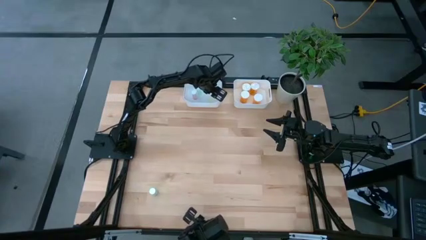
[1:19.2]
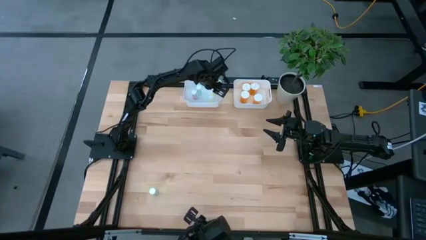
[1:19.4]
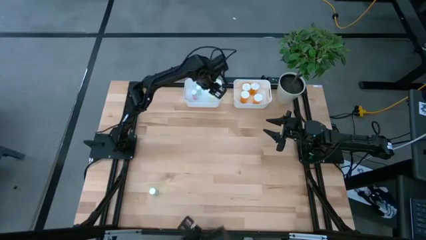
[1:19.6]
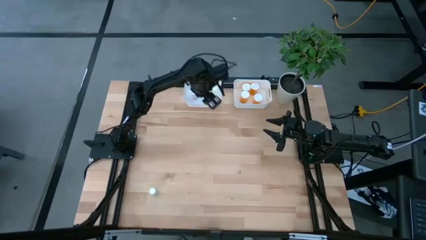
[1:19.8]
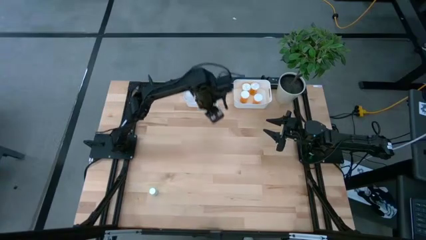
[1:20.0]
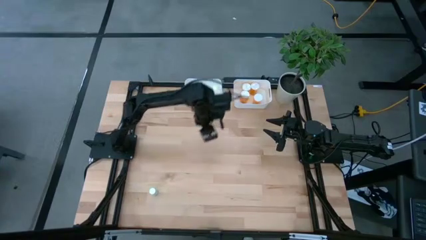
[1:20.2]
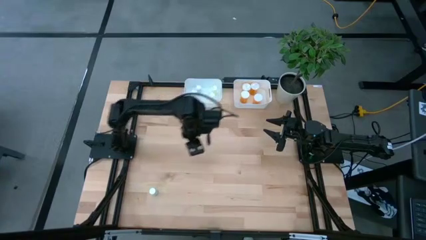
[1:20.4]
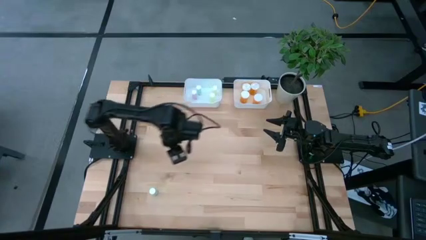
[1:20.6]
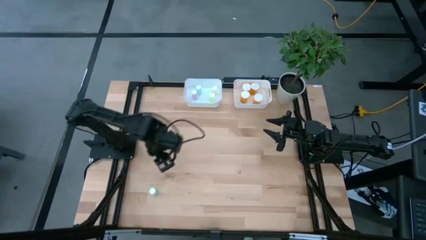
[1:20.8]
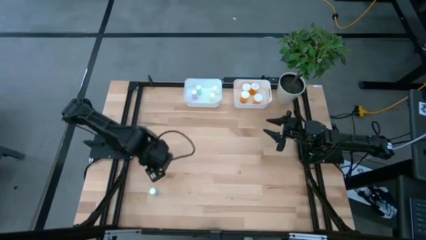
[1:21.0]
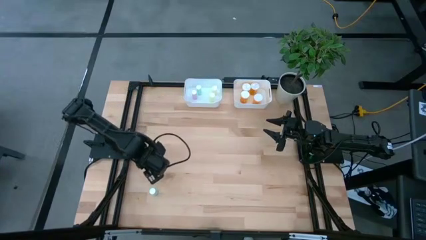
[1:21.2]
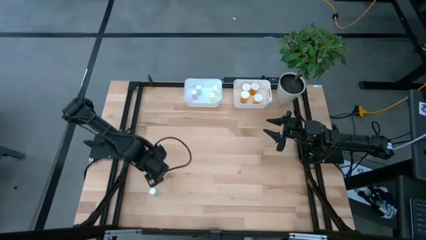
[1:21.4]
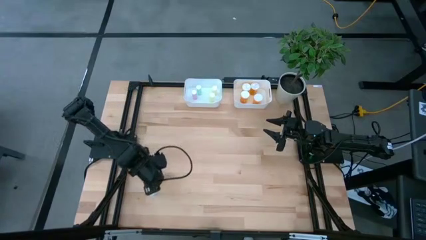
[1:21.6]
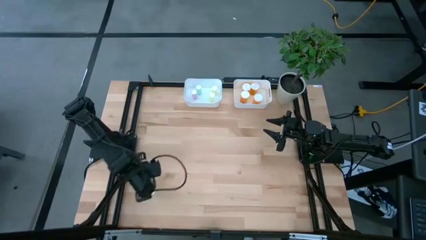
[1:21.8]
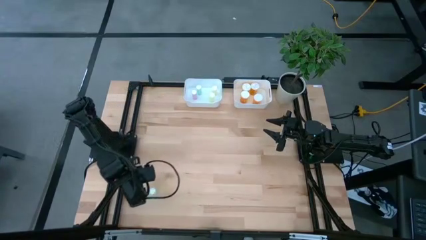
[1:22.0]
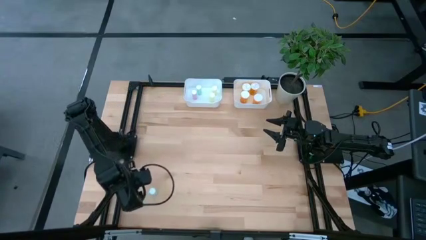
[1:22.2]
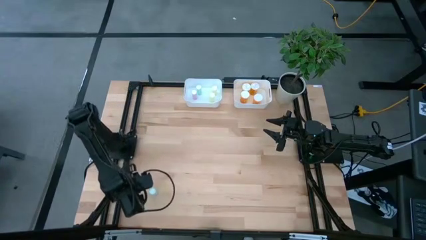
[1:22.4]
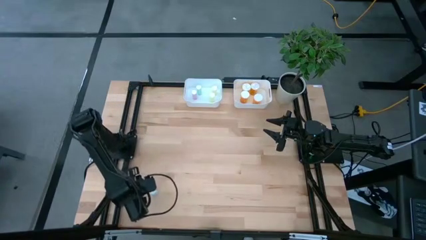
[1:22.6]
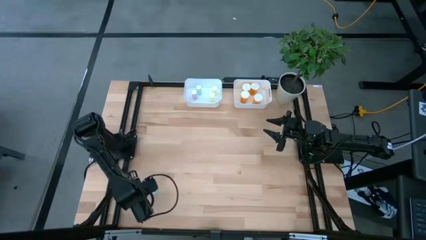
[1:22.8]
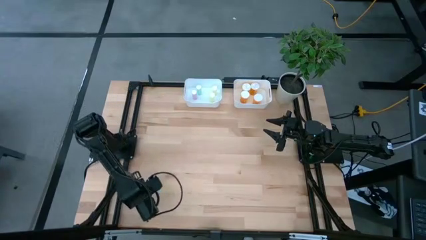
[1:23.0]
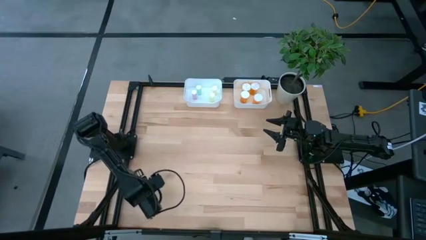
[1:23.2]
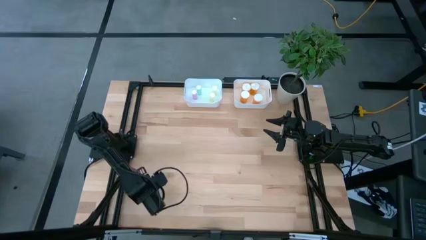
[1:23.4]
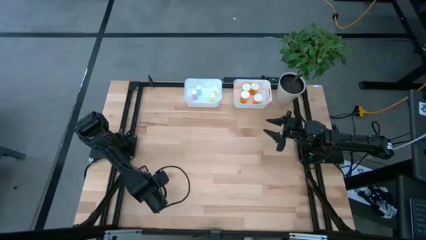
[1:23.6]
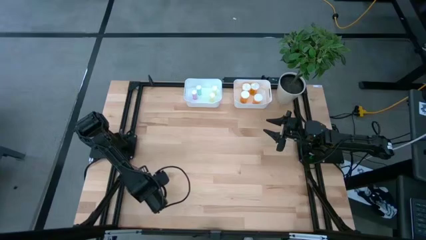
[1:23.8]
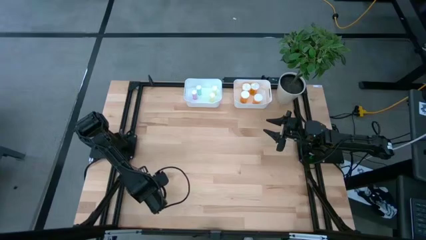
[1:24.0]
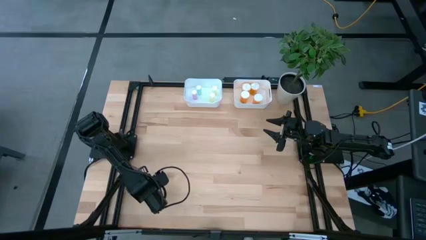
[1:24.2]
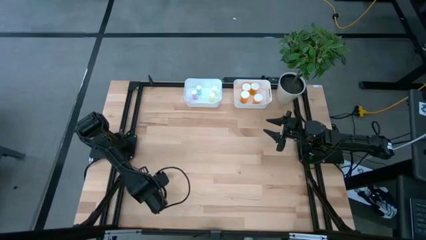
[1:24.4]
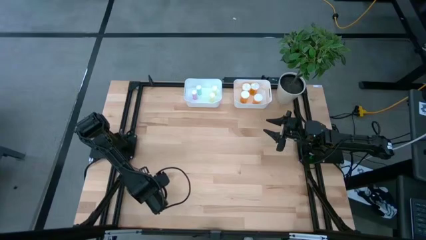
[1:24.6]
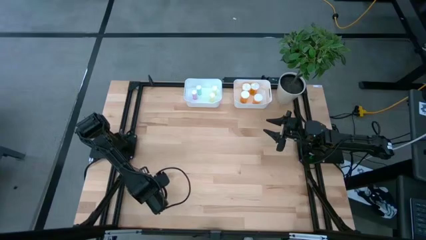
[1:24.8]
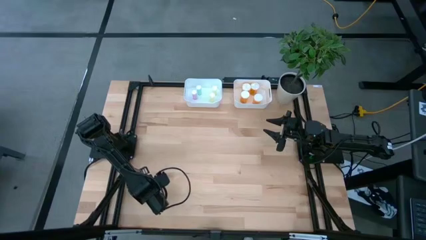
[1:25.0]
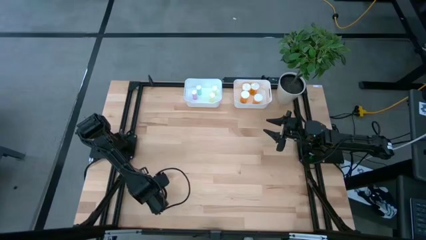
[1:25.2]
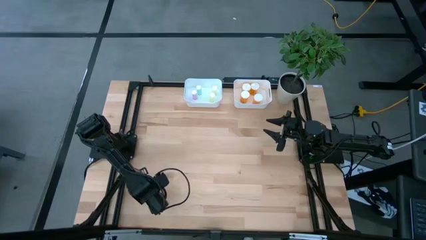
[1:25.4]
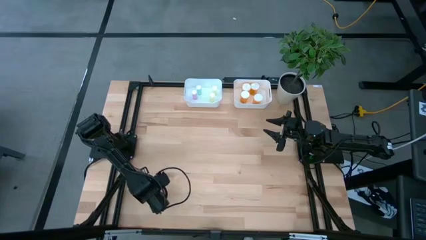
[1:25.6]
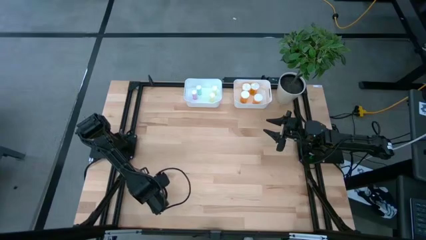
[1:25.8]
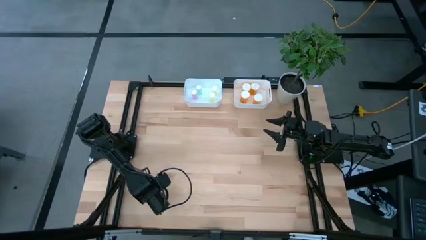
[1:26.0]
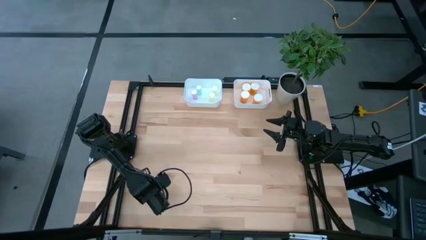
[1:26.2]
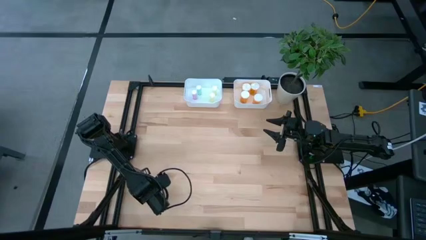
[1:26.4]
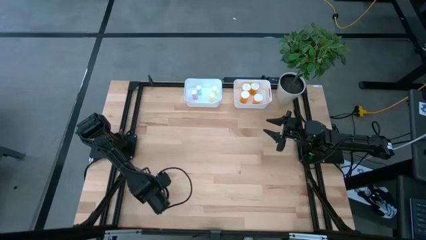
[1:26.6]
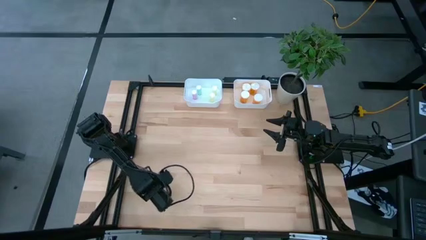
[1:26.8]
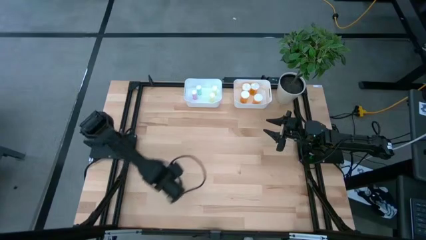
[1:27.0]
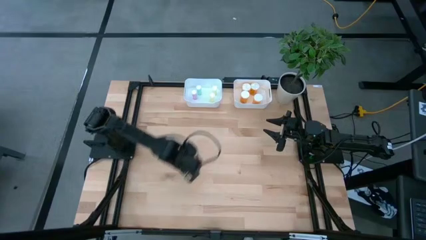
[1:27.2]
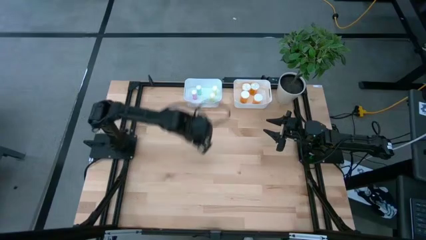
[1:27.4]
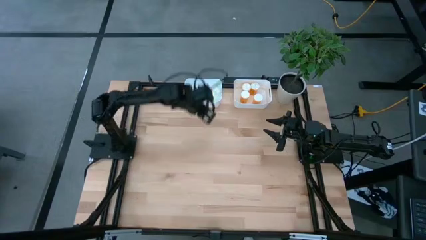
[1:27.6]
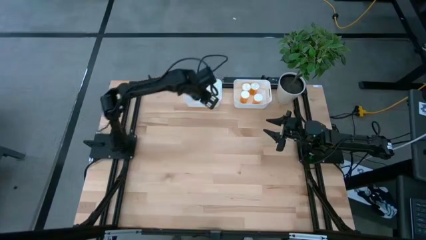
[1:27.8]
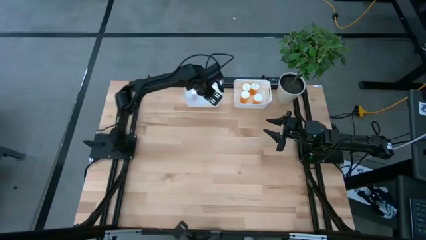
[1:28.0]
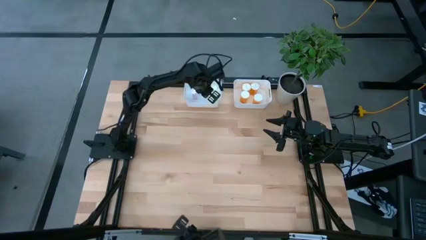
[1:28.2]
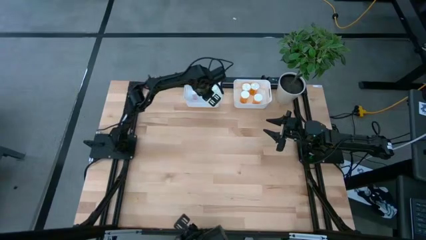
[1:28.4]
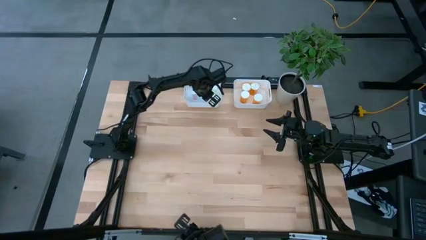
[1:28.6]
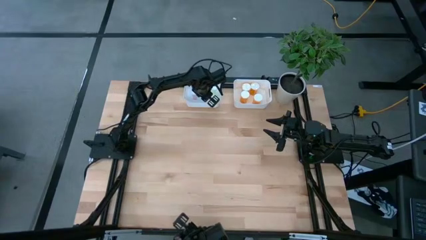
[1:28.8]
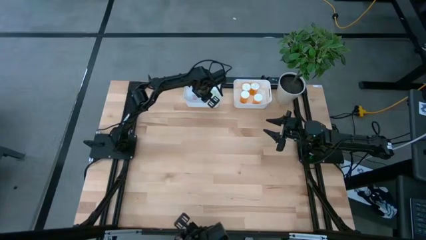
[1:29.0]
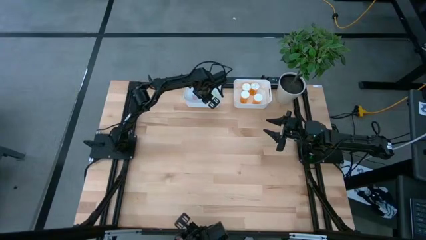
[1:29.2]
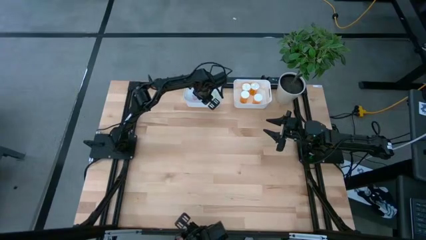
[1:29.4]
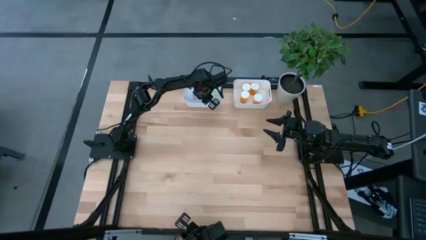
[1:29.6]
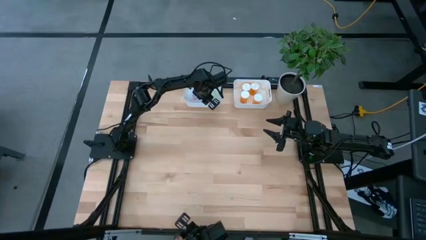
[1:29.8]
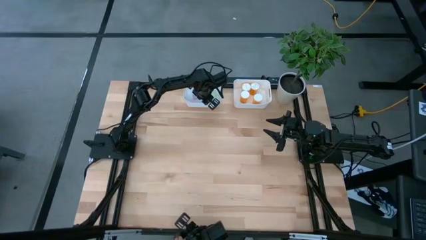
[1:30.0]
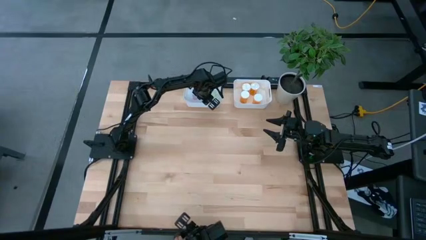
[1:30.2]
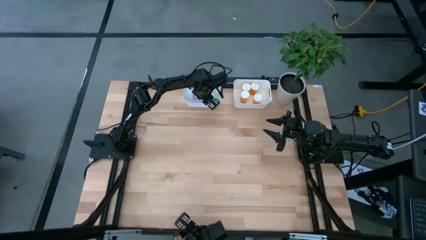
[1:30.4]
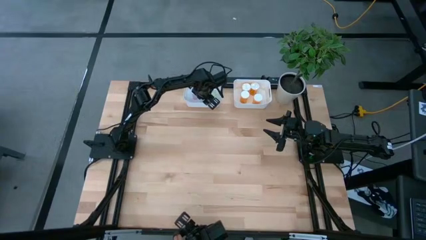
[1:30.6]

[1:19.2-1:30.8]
Task: Pick and place medicine bottles into bin by pill shape (circle, oval)
Put the blue pill bottle into the left white bin

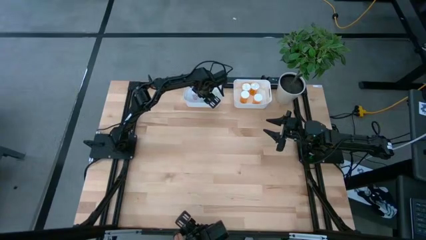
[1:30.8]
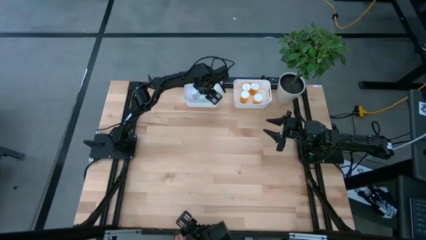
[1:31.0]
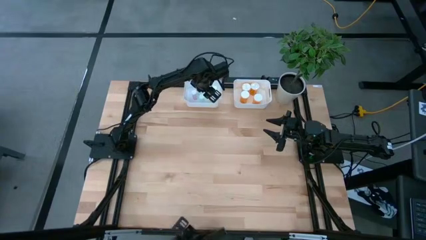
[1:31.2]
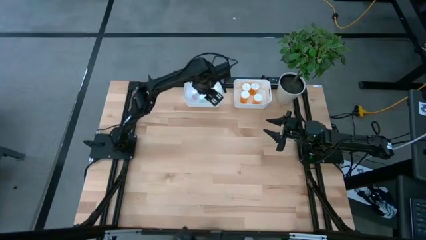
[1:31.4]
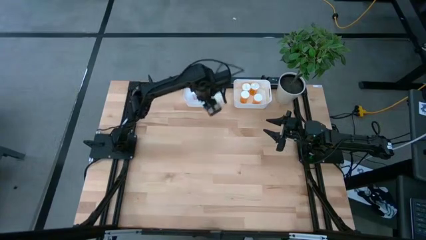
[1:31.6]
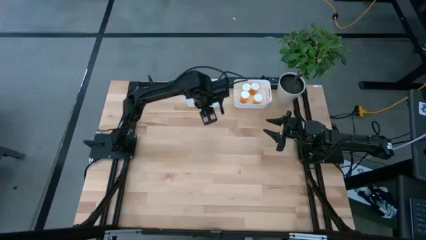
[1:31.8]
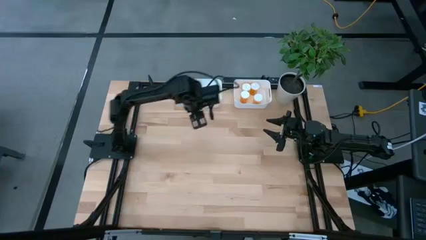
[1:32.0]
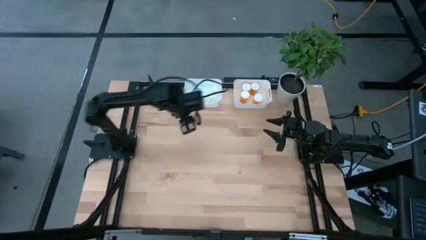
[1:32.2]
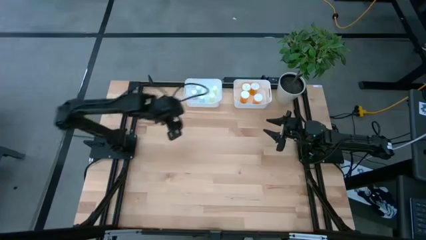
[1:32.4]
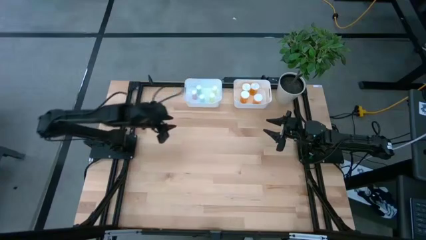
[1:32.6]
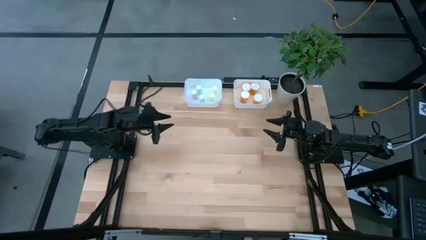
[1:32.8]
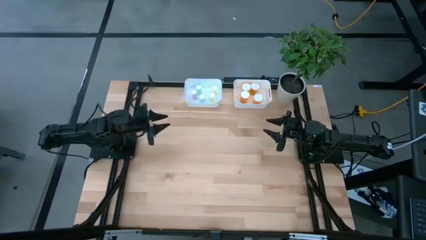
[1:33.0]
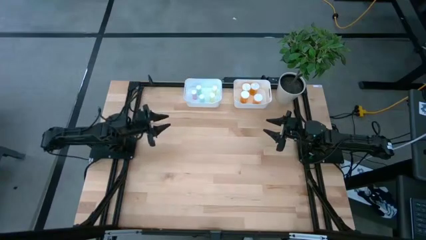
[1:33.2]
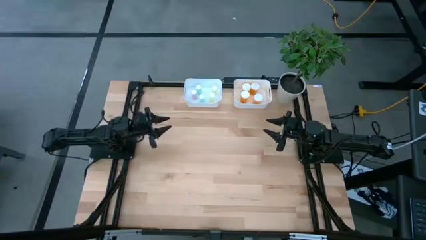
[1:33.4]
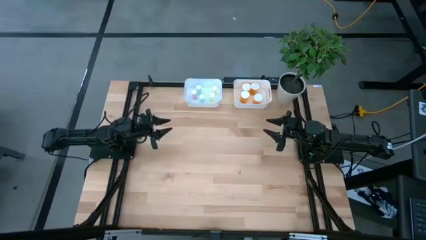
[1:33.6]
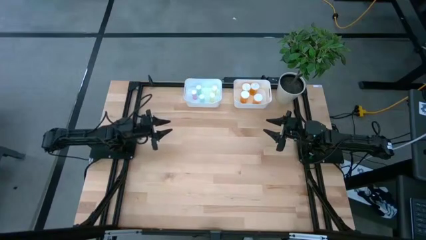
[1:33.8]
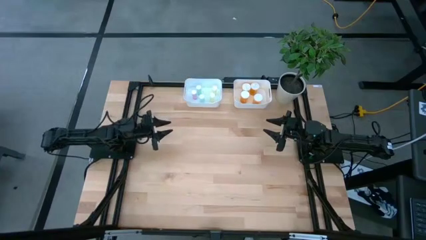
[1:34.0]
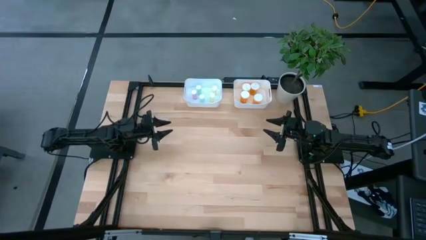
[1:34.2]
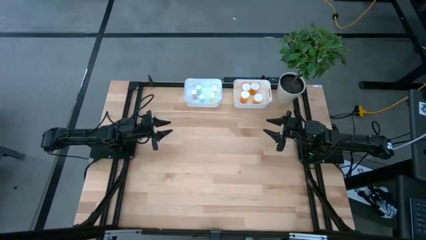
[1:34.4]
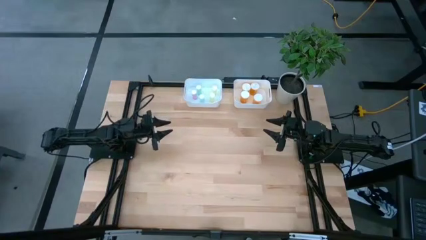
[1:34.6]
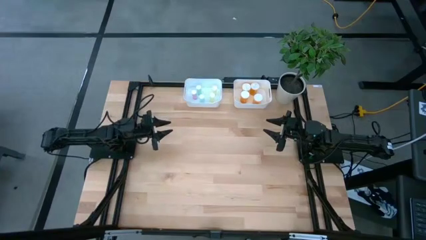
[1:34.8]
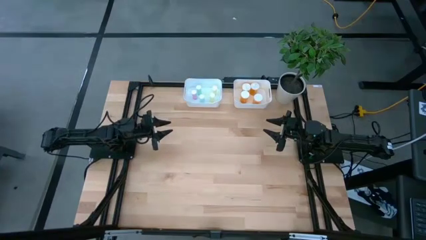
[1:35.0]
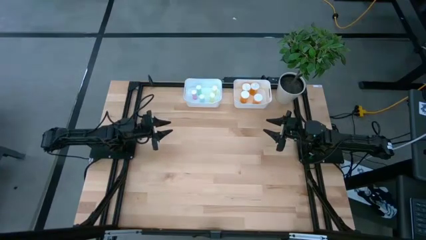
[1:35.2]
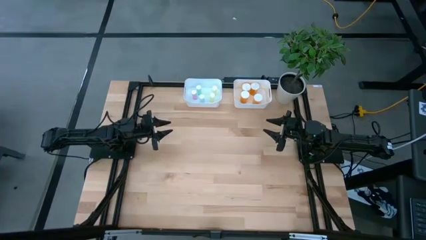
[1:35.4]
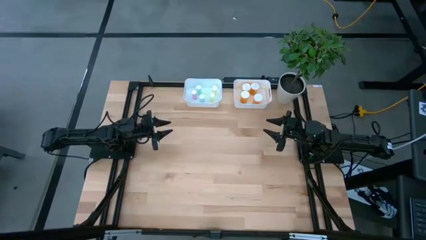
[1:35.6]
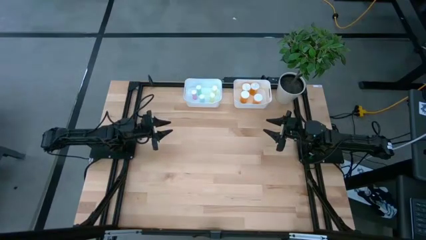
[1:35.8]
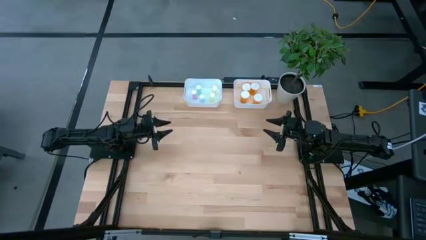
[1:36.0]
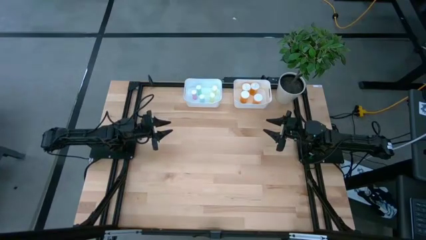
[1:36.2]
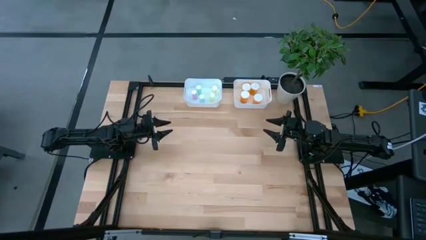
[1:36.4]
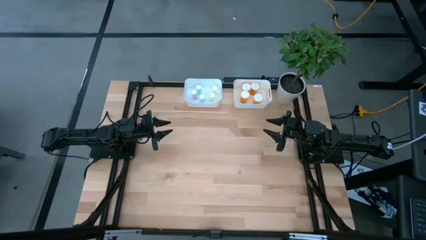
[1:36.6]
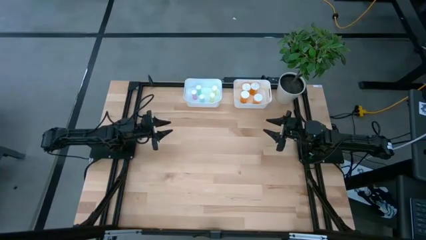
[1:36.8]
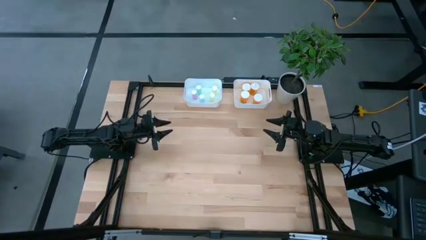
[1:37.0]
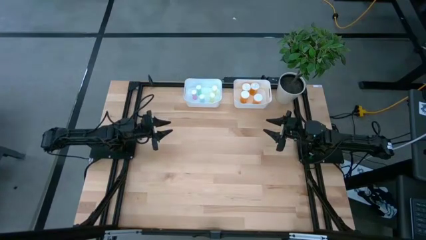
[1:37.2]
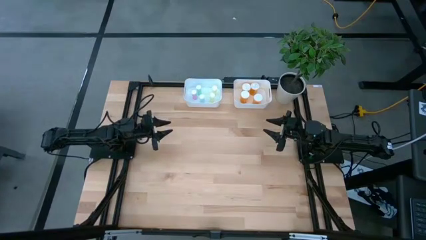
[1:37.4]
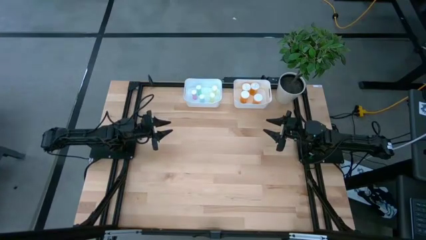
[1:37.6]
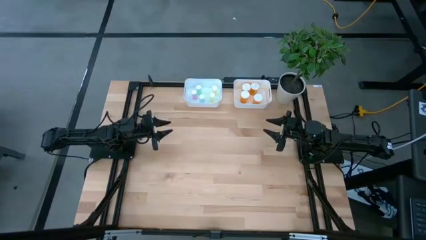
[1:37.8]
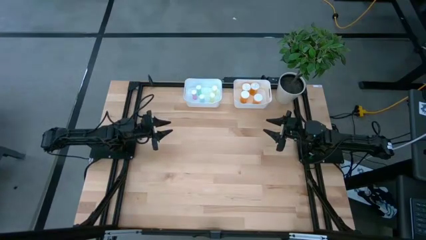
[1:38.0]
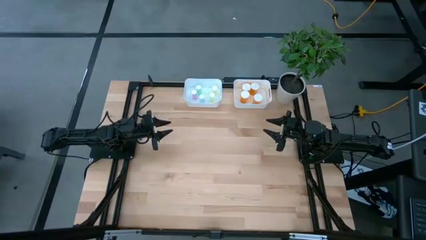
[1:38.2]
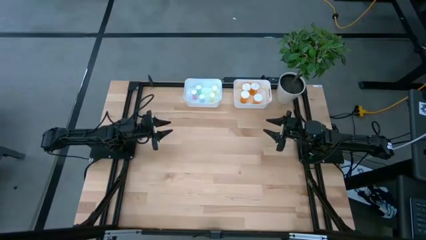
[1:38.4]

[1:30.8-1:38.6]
Return to Home Position
